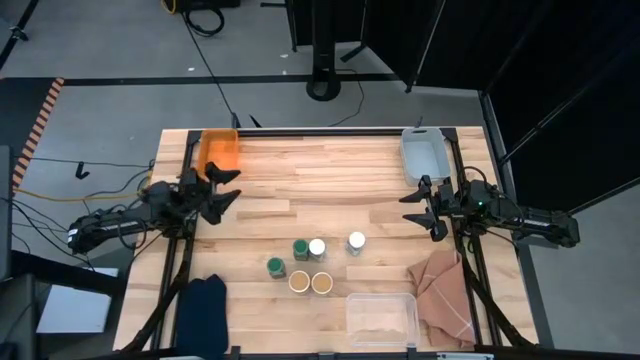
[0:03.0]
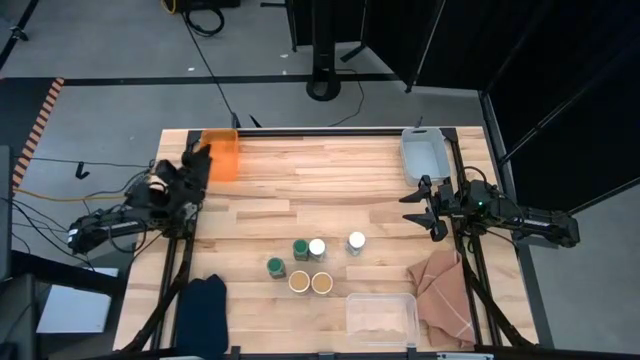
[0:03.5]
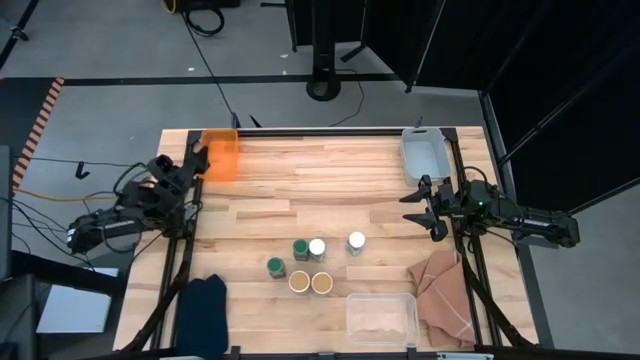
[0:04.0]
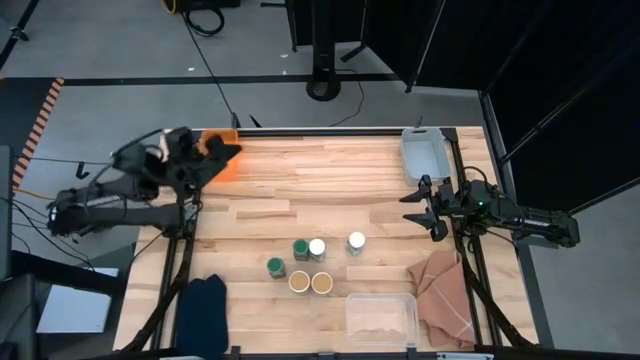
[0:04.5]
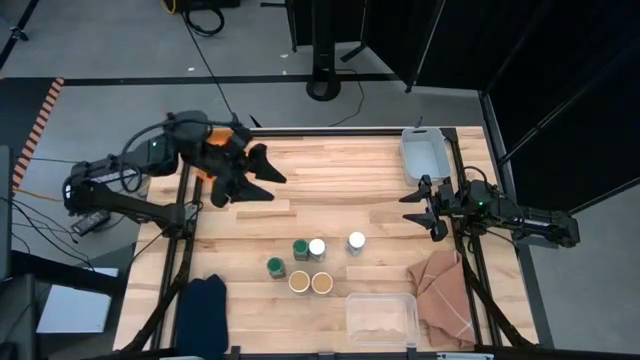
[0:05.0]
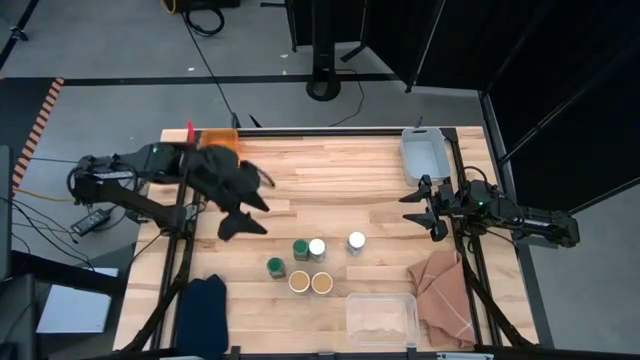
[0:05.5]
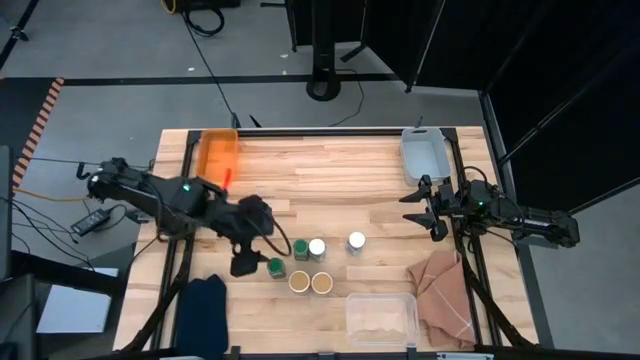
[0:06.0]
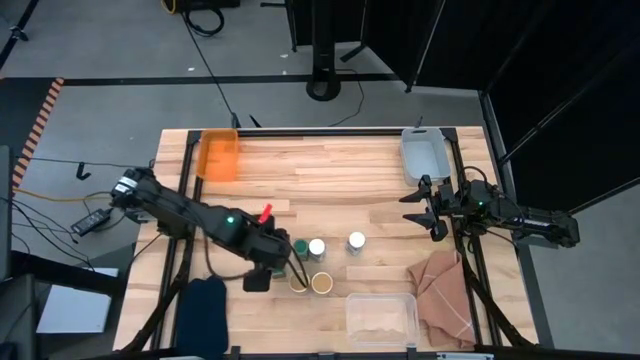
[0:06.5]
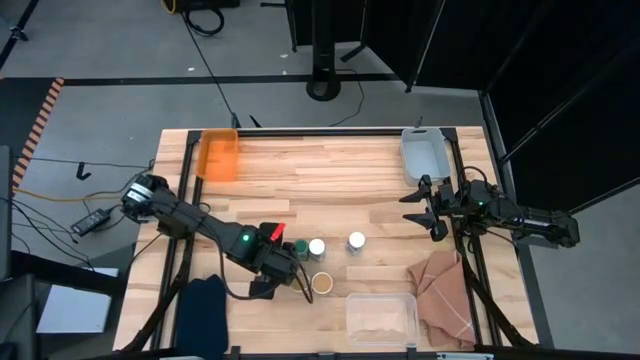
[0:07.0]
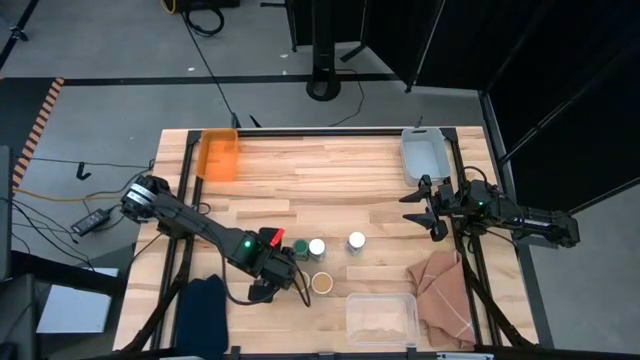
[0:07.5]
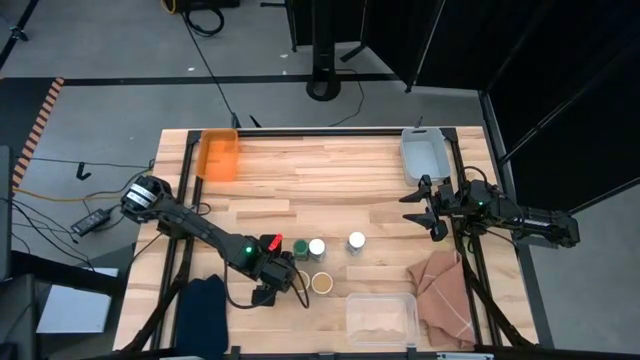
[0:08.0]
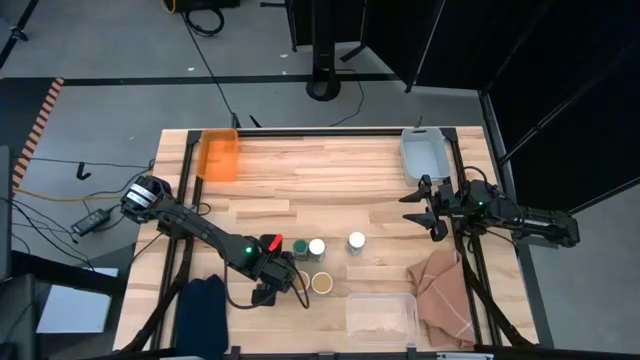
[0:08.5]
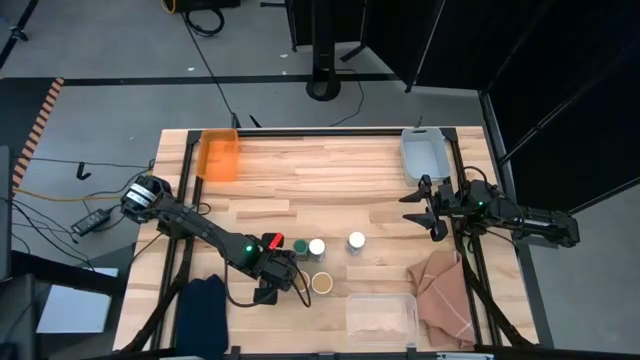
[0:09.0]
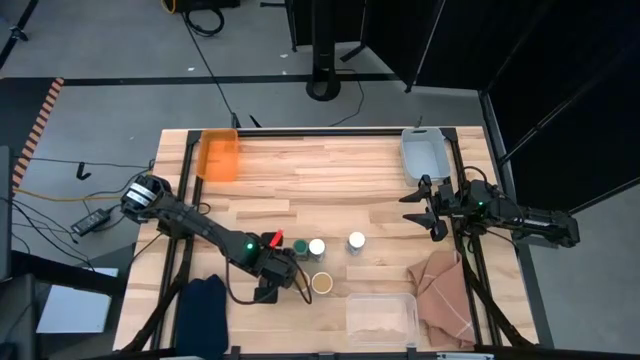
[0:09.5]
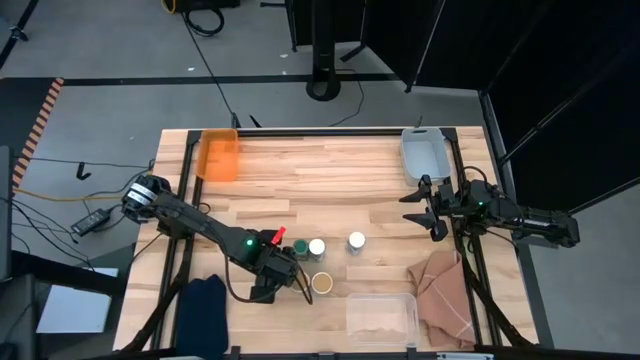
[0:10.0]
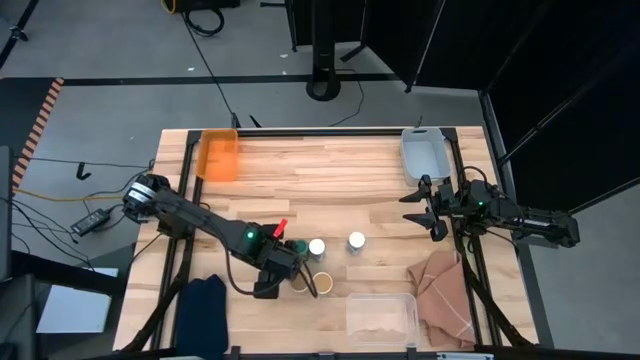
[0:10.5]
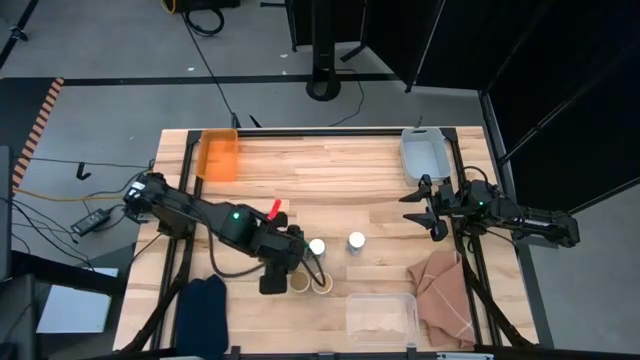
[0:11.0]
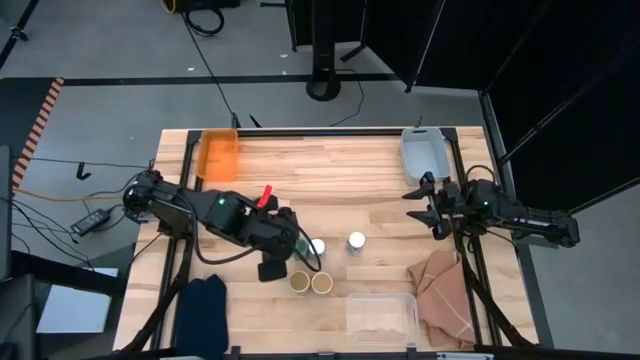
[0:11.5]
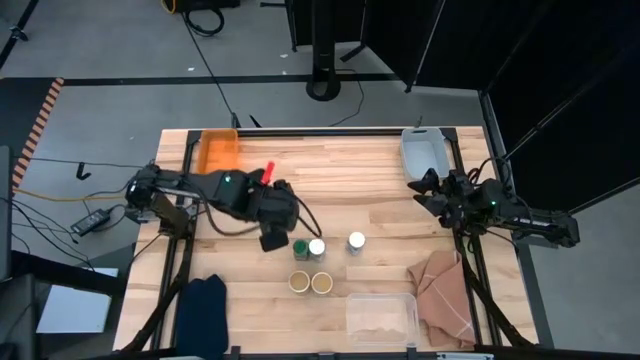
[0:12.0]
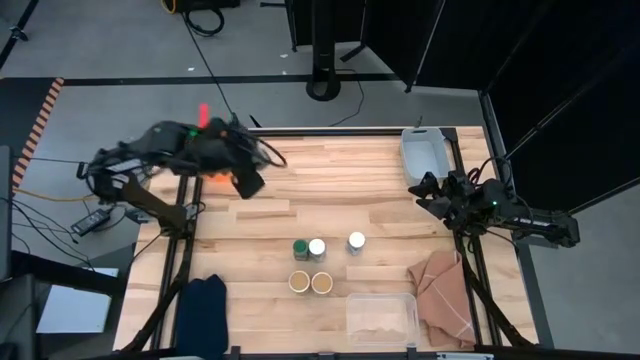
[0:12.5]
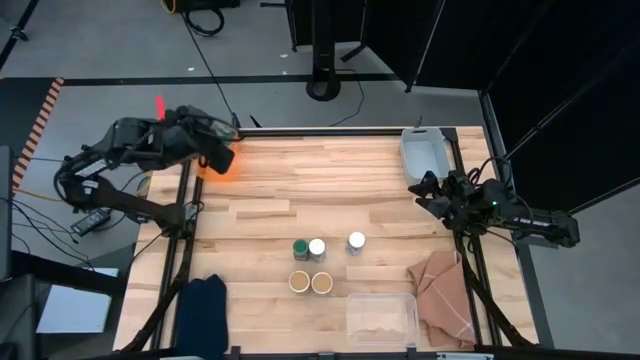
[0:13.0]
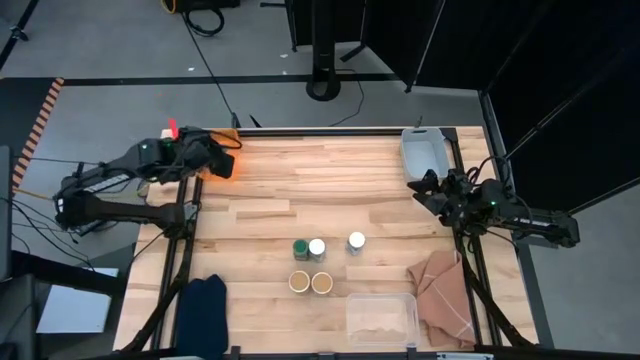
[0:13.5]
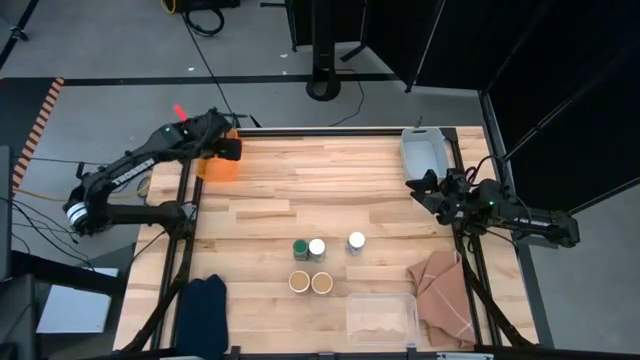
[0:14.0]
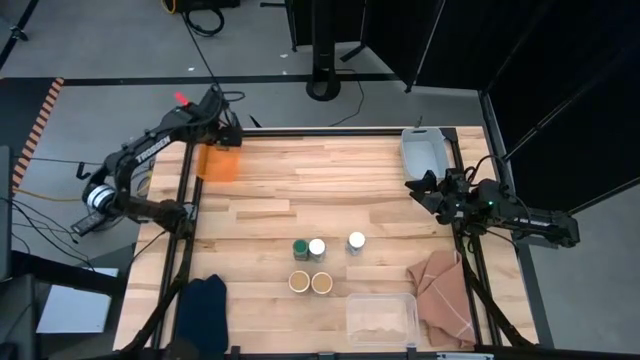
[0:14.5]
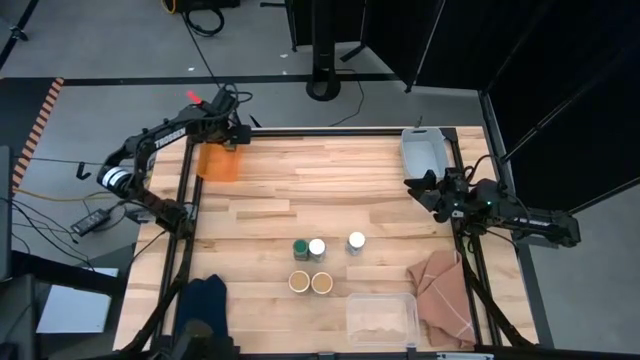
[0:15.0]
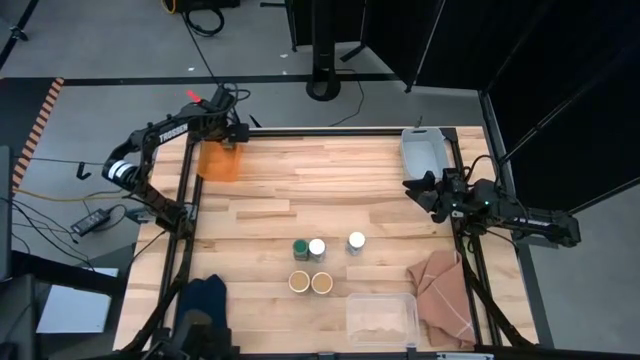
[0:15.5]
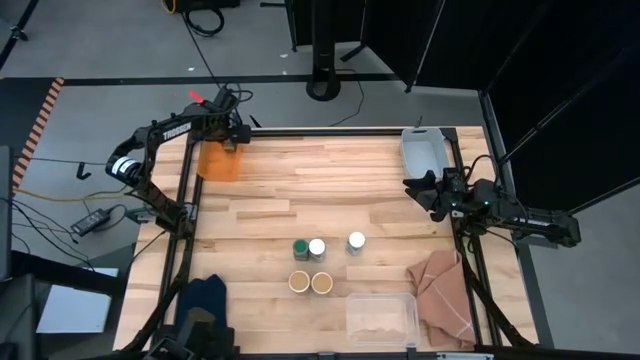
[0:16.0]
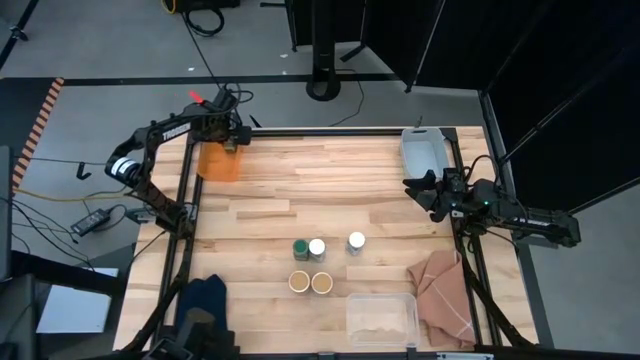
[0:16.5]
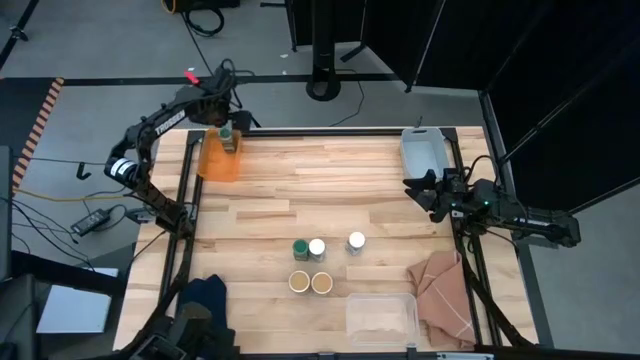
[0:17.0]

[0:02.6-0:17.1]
Task: Sort spices by type
Put the left green seasoning bottle into the orange bin

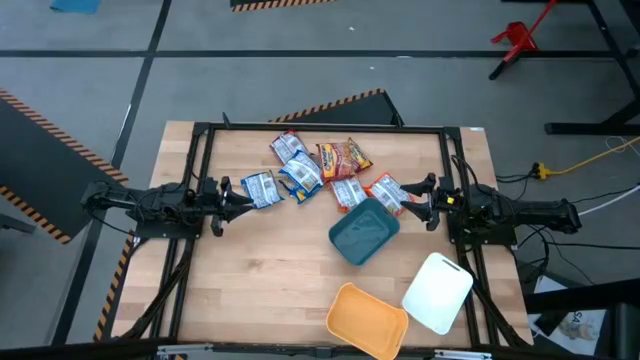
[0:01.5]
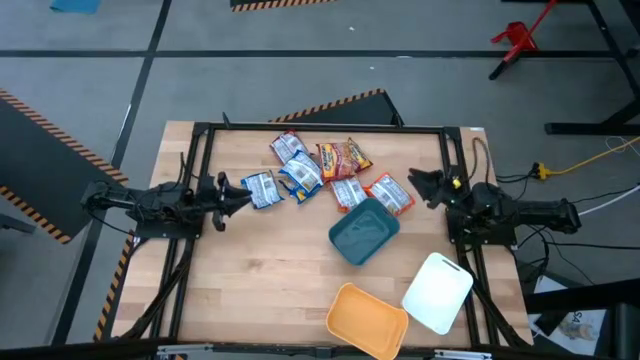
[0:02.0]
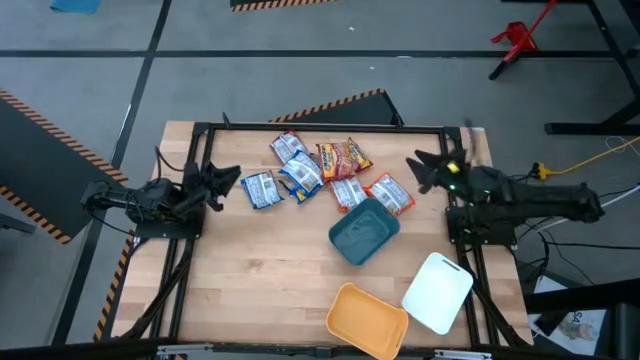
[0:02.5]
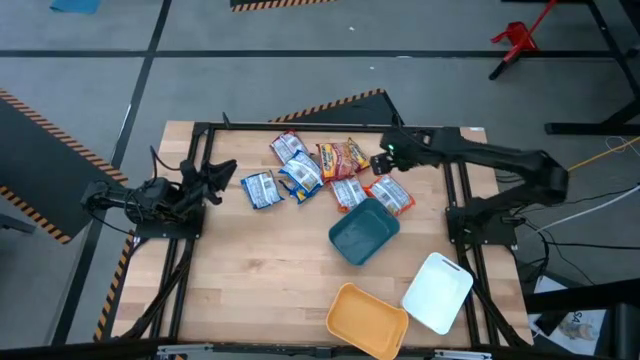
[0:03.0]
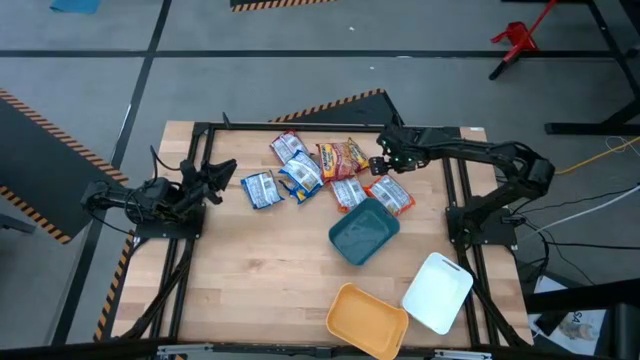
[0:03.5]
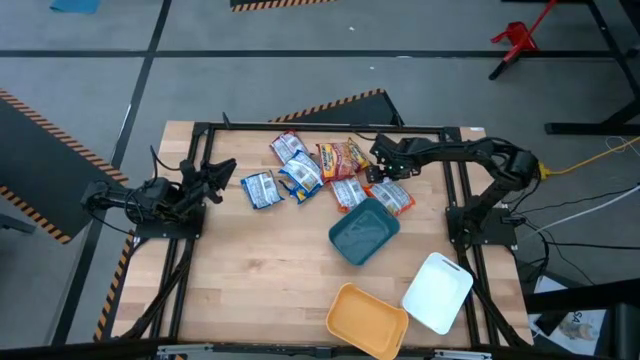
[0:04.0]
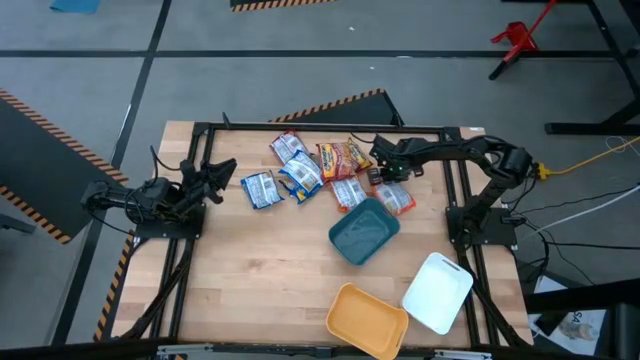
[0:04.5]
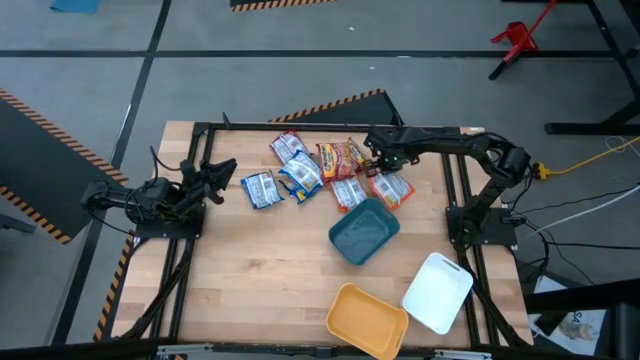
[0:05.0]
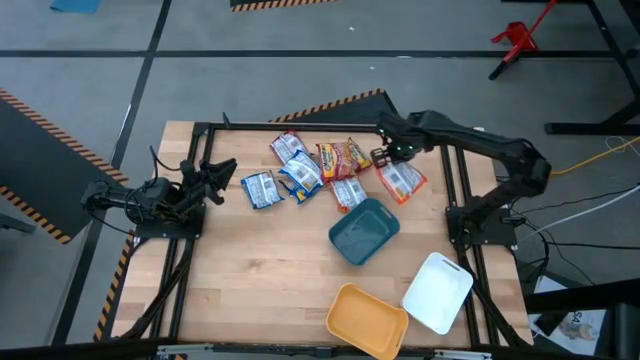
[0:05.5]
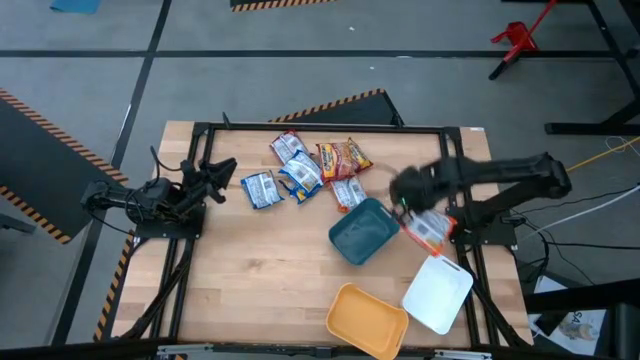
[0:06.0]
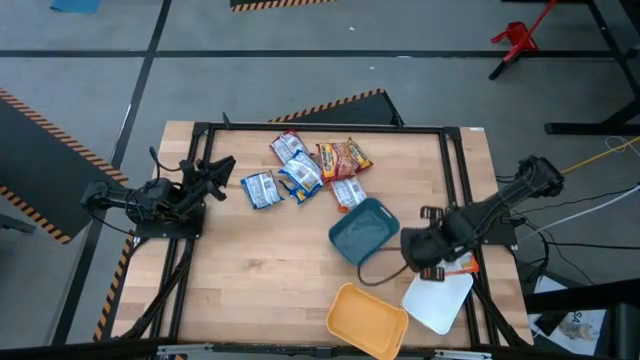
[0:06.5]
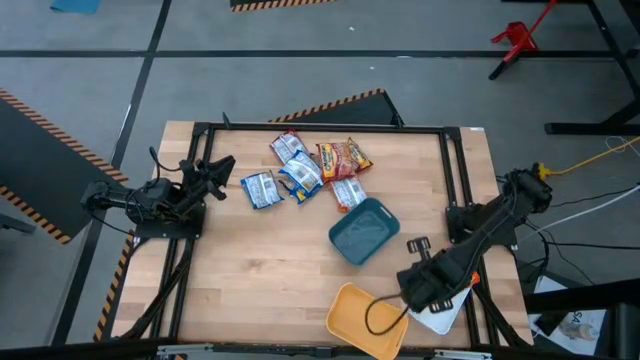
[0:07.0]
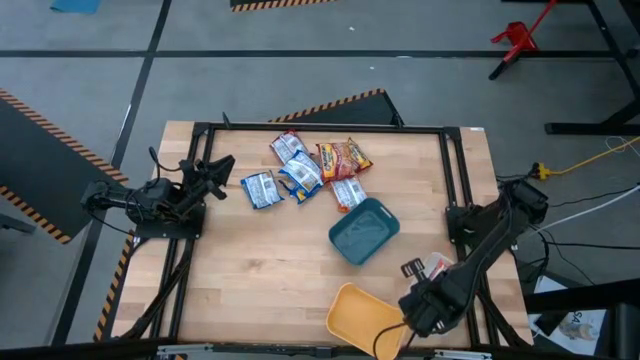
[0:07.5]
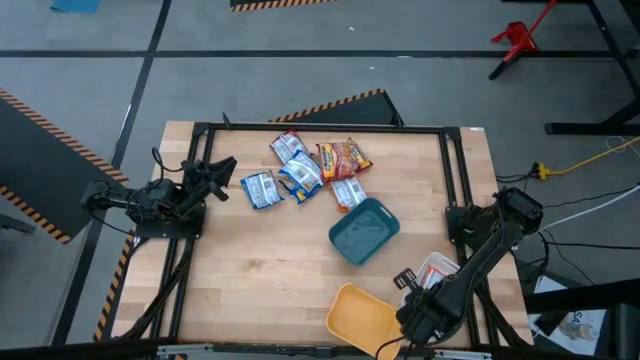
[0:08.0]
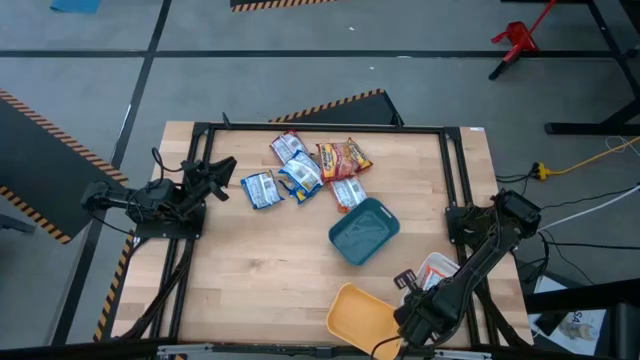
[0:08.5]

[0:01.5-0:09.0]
Task: Sort Maruchan noodles
Put the right orange noodle pack into the white bin
